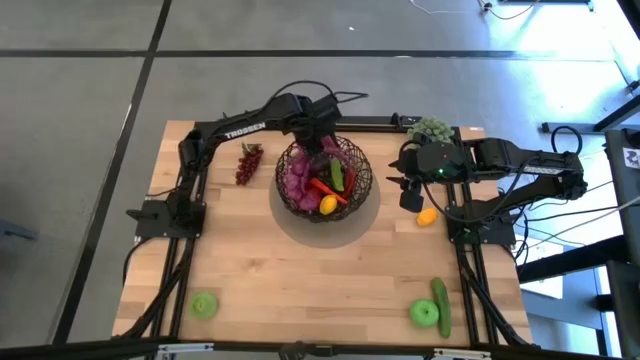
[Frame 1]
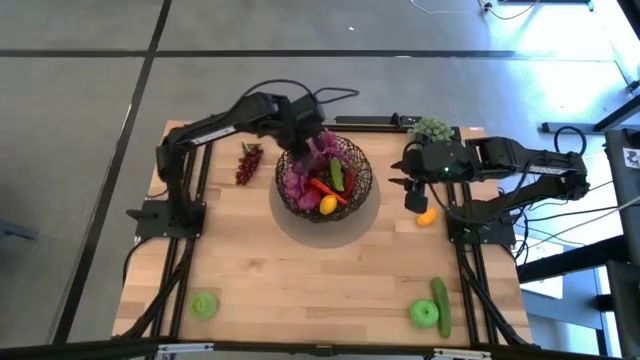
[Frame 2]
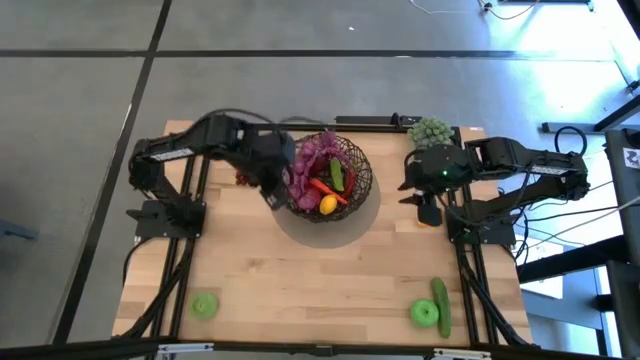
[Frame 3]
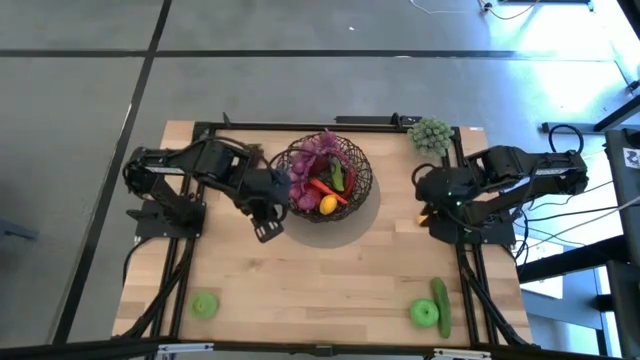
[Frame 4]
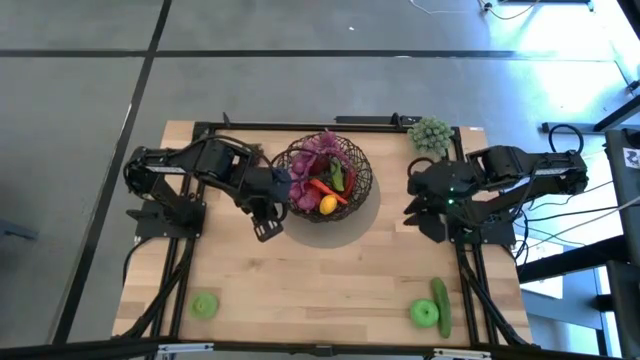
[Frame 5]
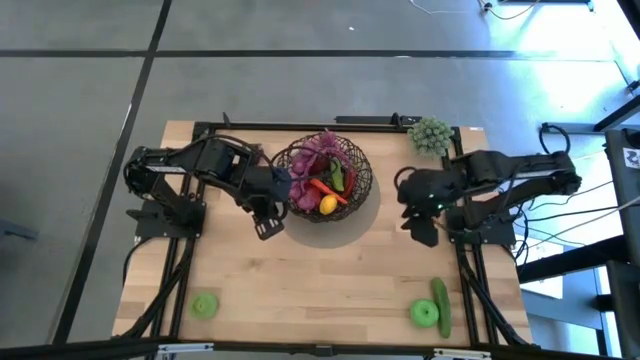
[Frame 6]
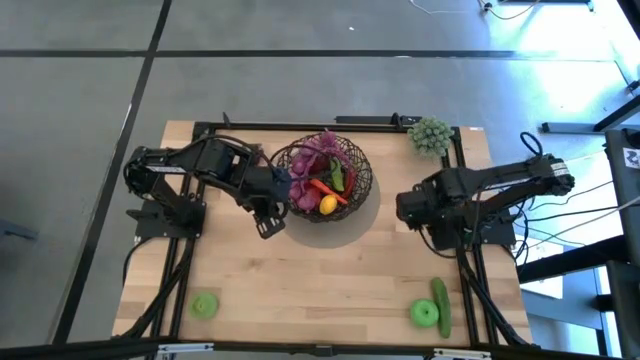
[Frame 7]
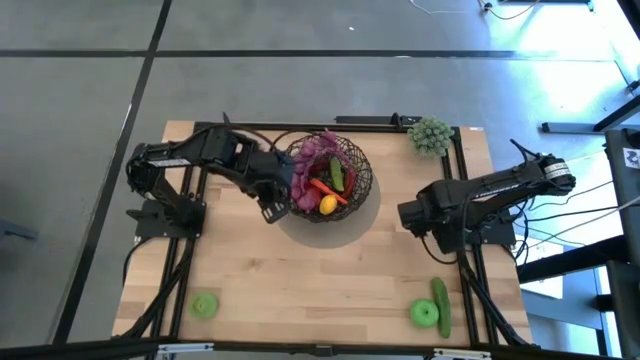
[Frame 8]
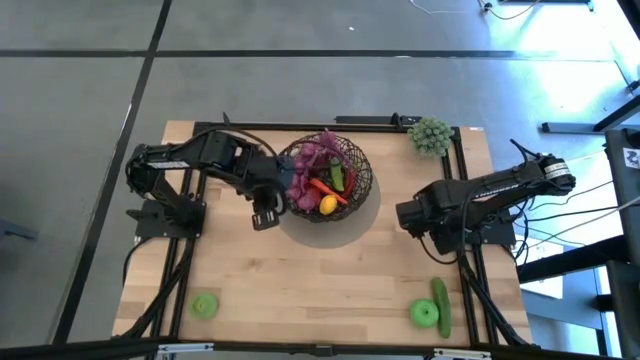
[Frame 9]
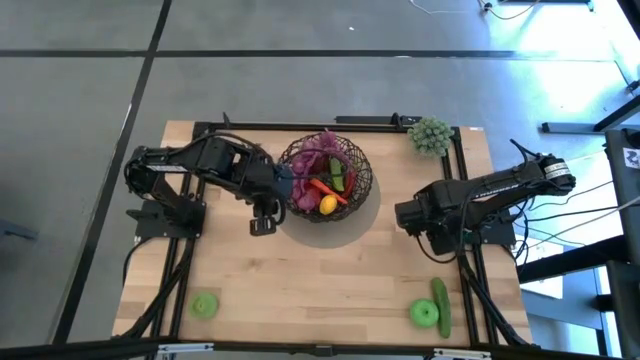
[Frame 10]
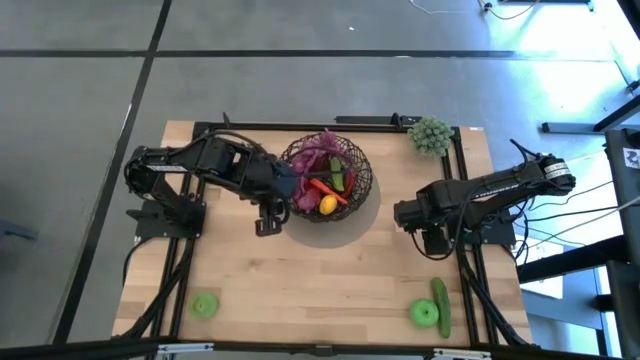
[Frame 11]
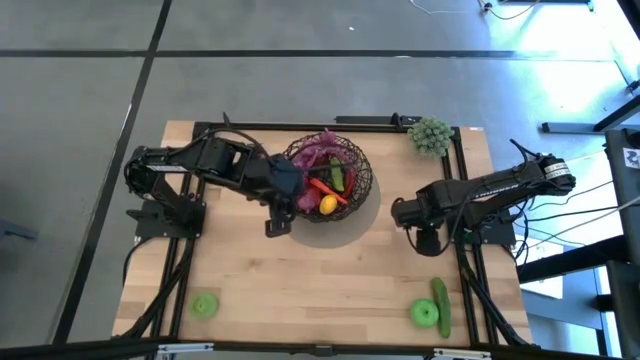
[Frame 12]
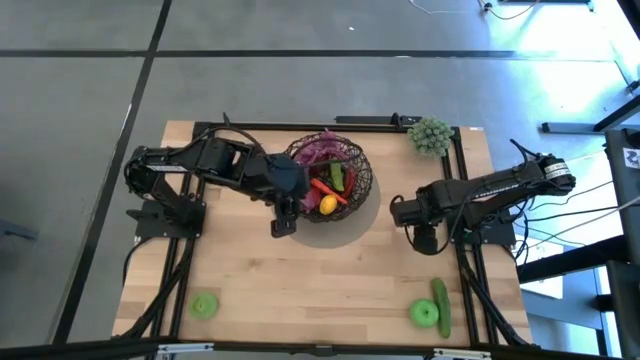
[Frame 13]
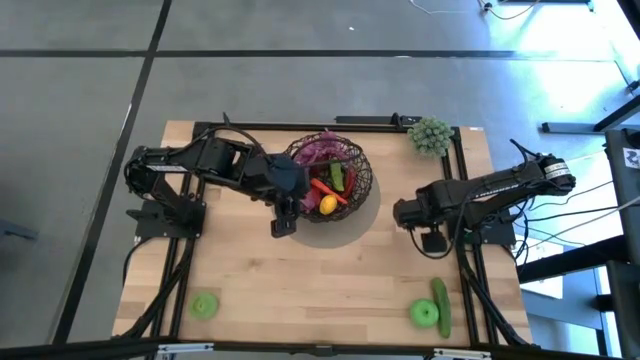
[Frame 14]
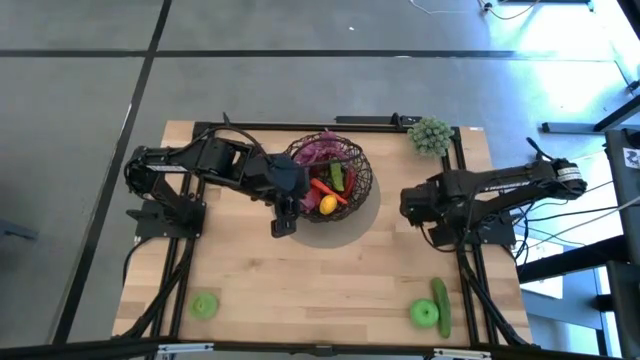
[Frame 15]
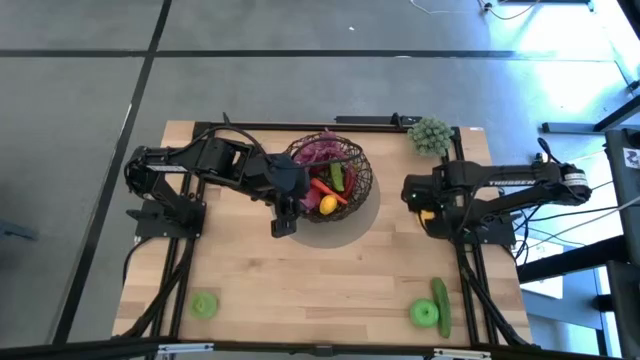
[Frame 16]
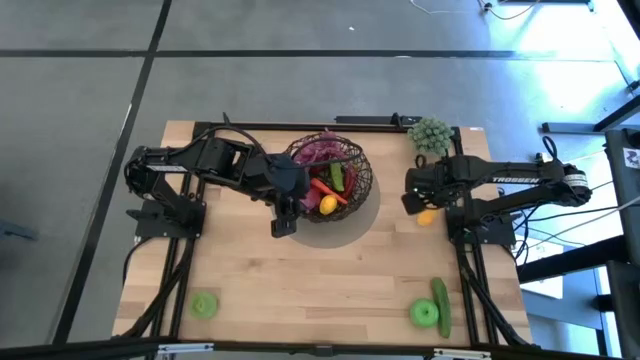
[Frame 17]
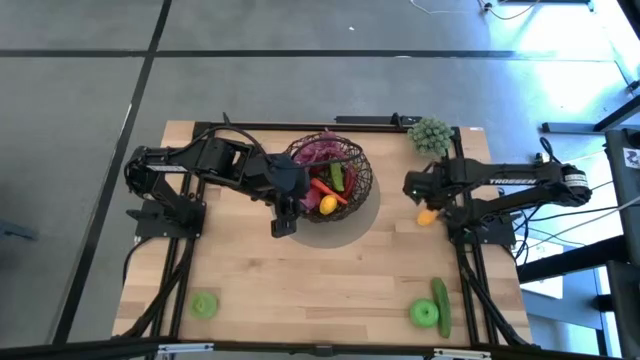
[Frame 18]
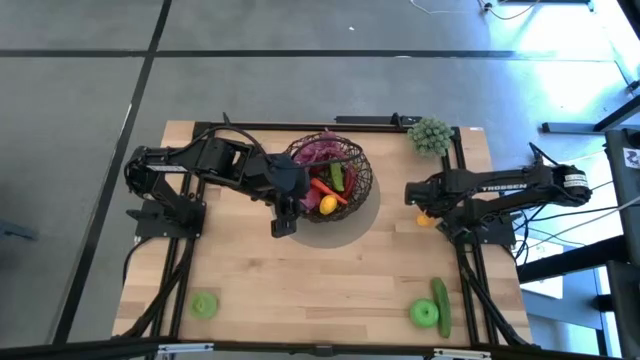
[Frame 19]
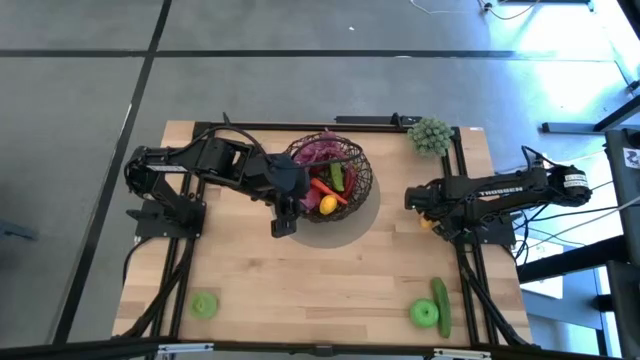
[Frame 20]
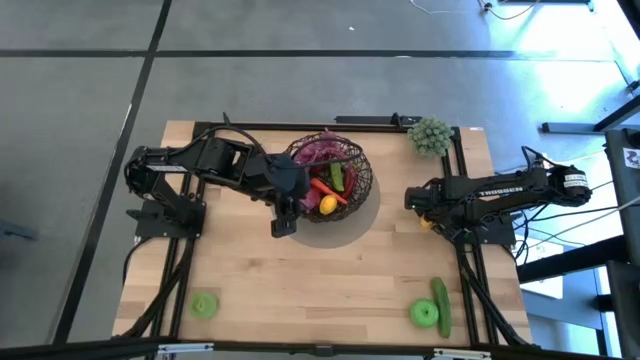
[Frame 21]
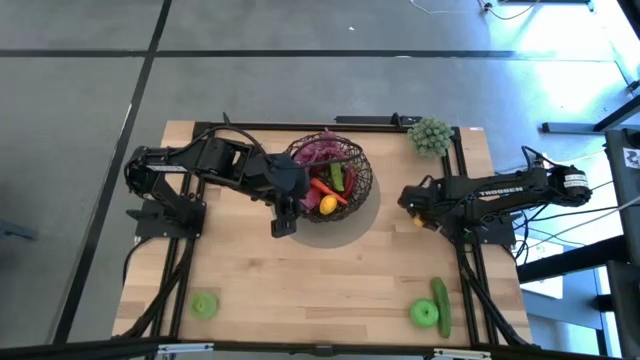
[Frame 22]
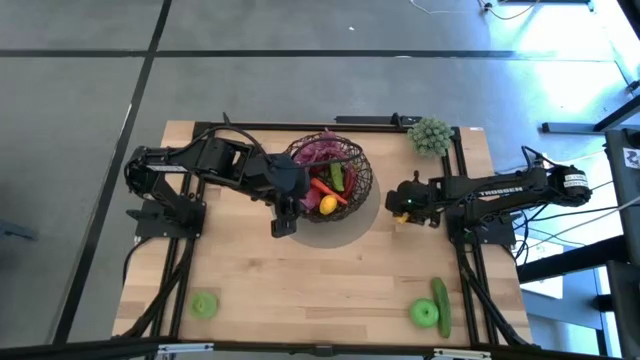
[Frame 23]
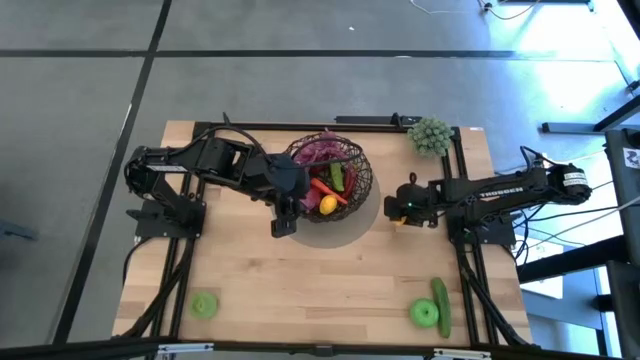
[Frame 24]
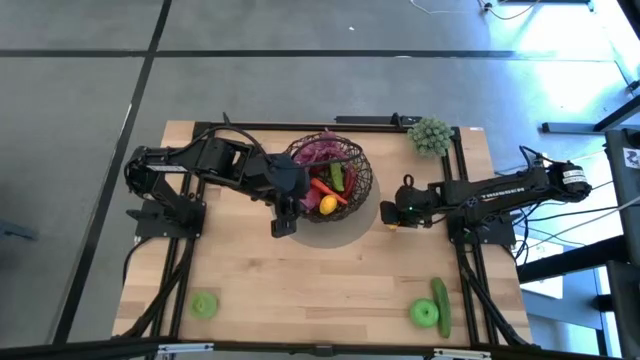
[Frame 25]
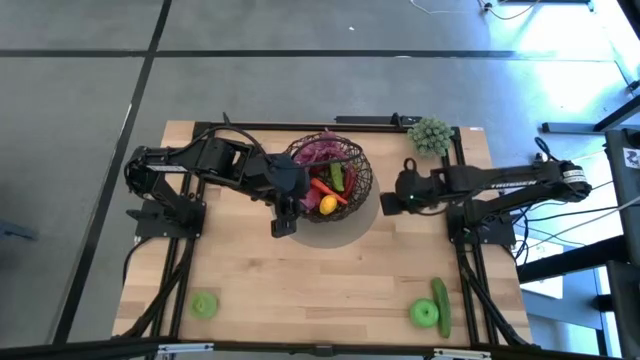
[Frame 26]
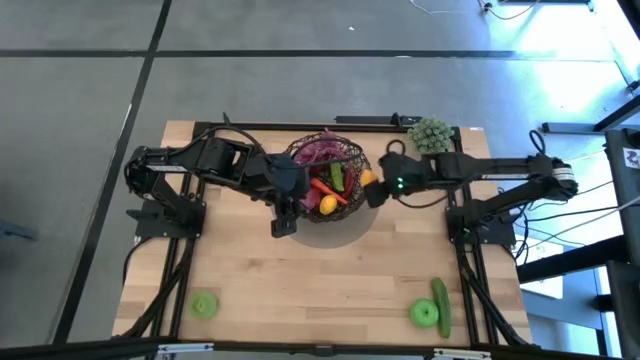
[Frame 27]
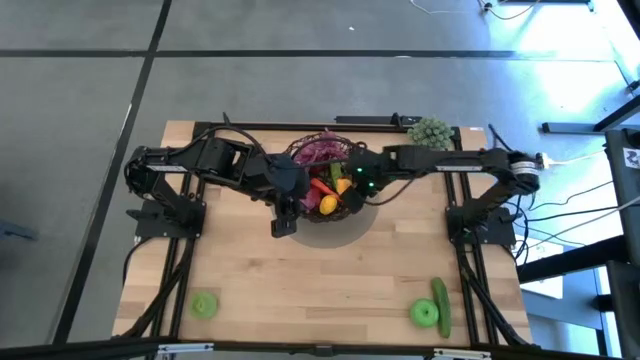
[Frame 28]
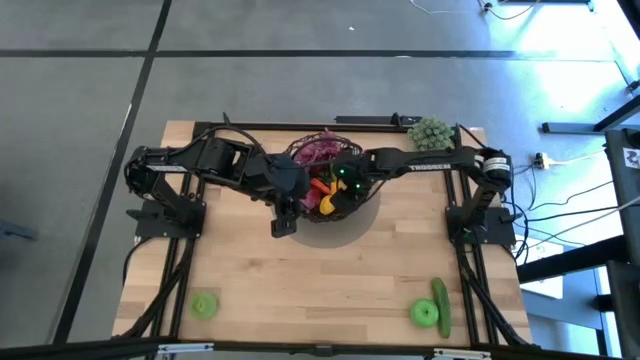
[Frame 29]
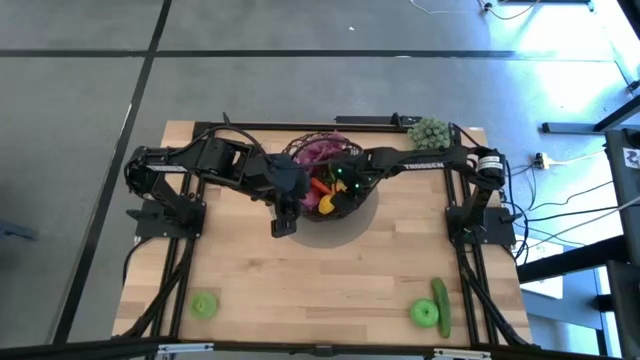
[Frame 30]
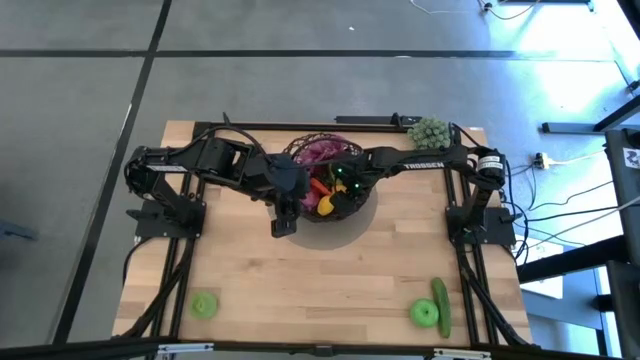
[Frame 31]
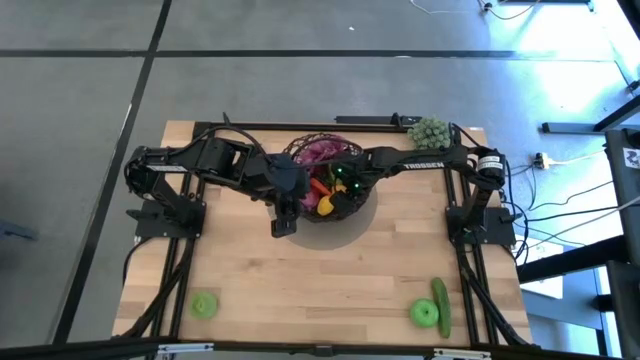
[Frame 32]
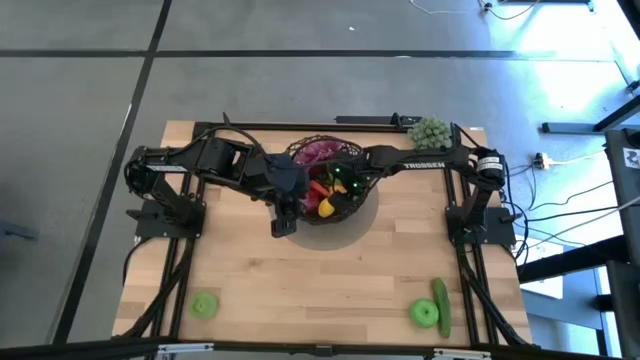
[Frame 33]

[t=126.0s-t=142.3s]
Task: Build produce basket
Put the lemon into the wire basket
